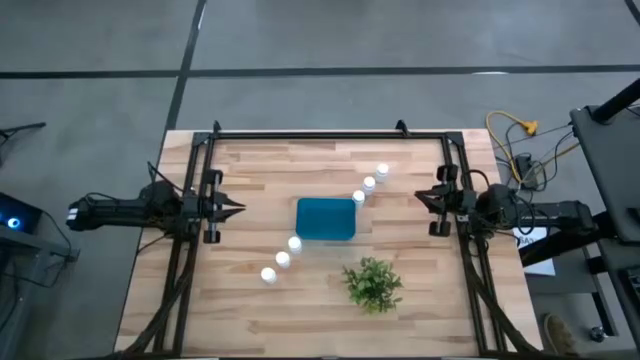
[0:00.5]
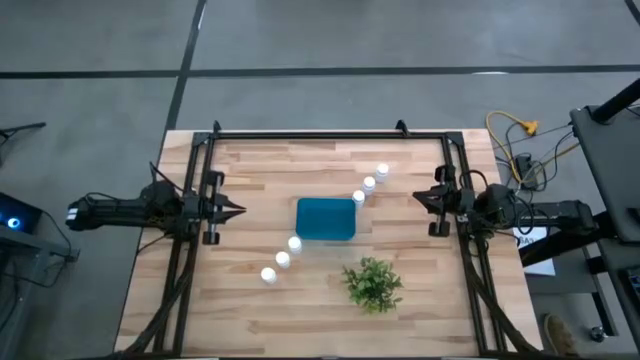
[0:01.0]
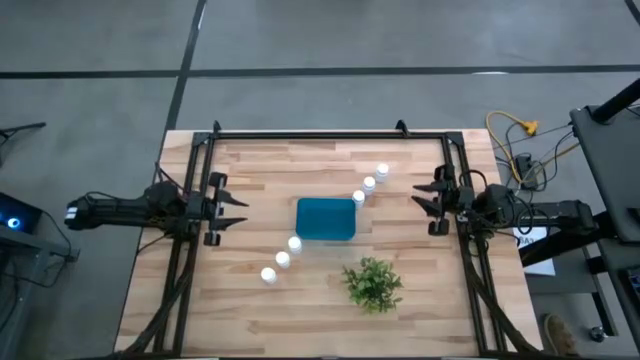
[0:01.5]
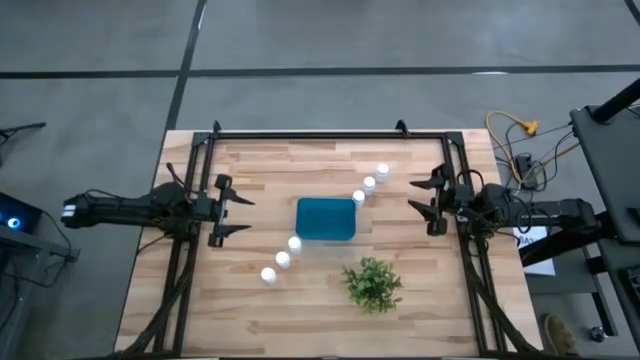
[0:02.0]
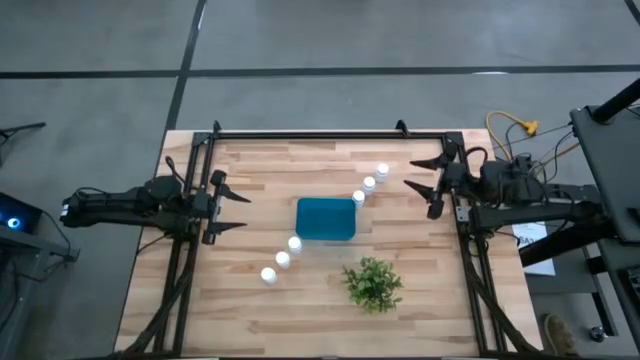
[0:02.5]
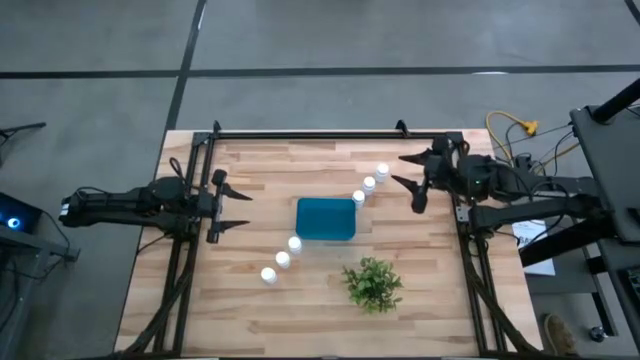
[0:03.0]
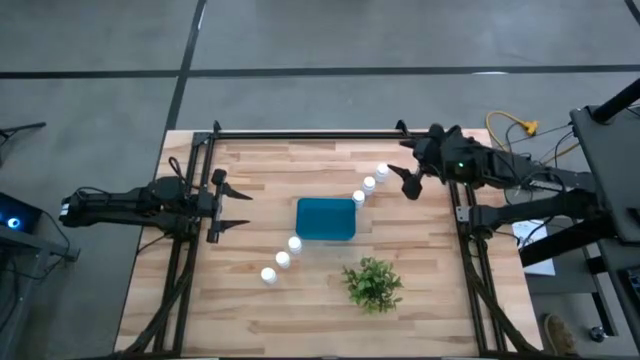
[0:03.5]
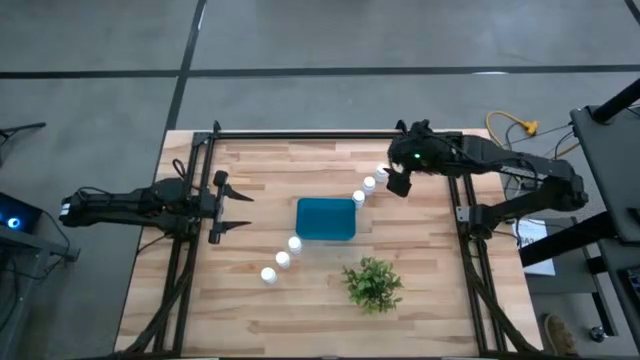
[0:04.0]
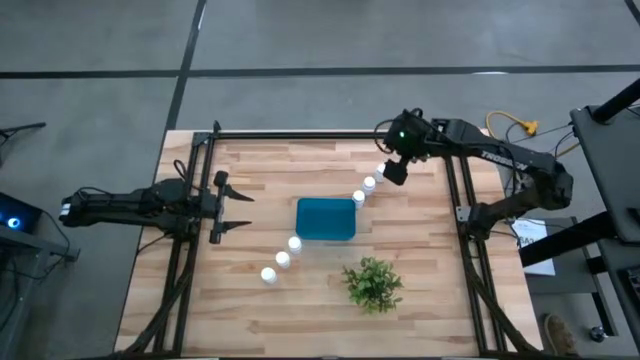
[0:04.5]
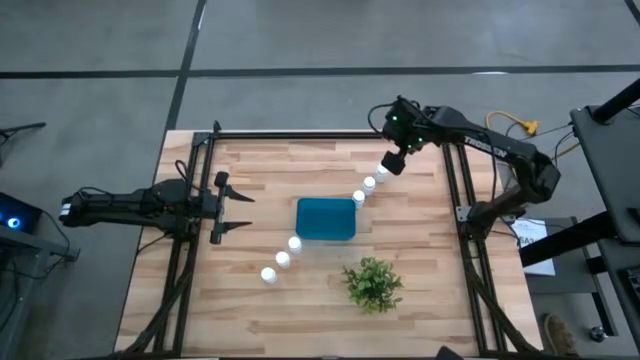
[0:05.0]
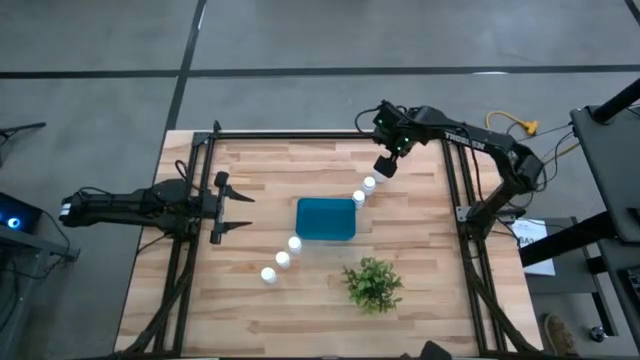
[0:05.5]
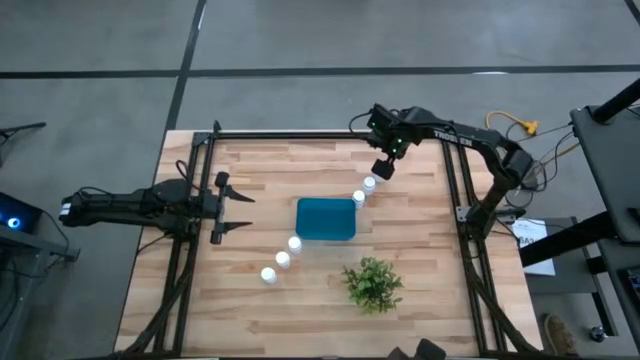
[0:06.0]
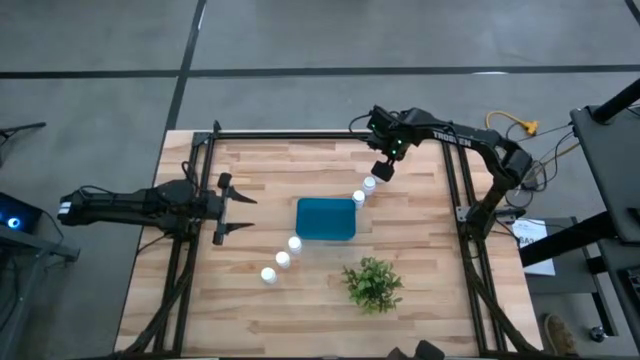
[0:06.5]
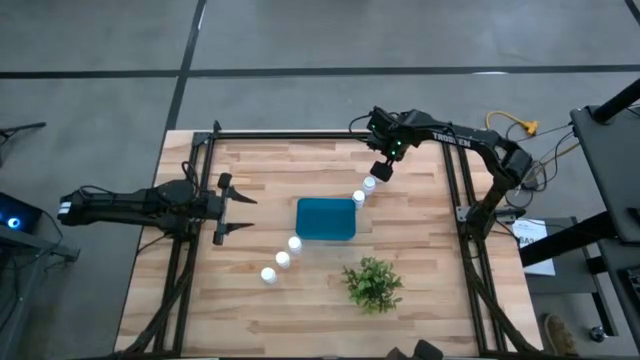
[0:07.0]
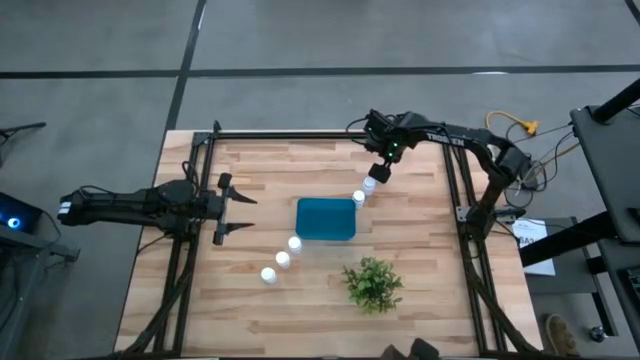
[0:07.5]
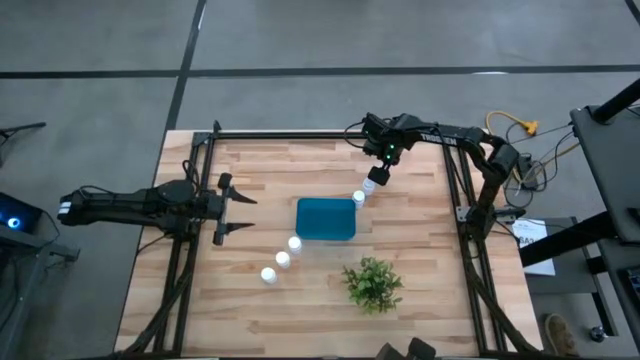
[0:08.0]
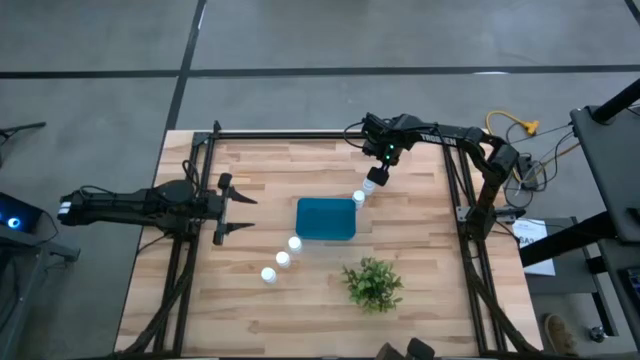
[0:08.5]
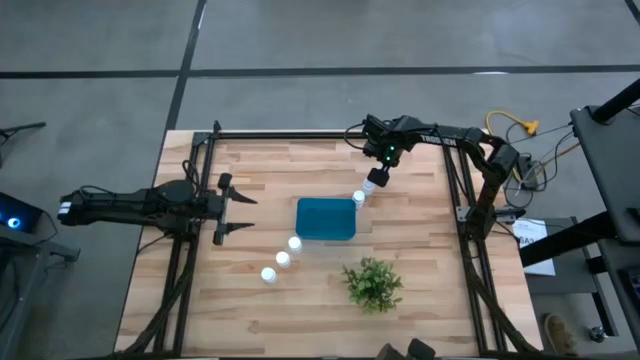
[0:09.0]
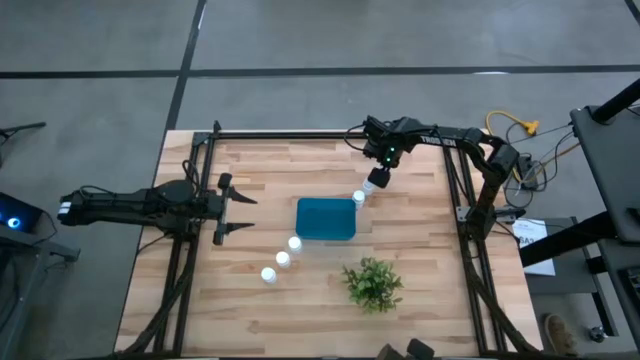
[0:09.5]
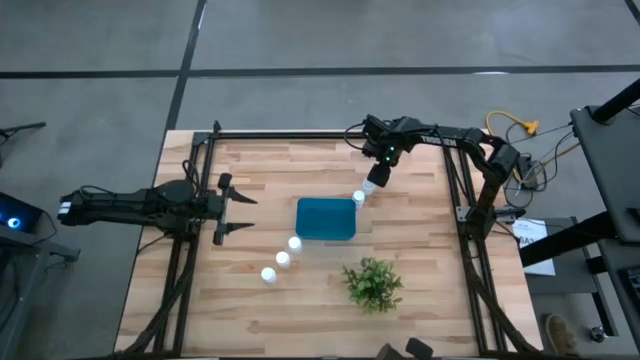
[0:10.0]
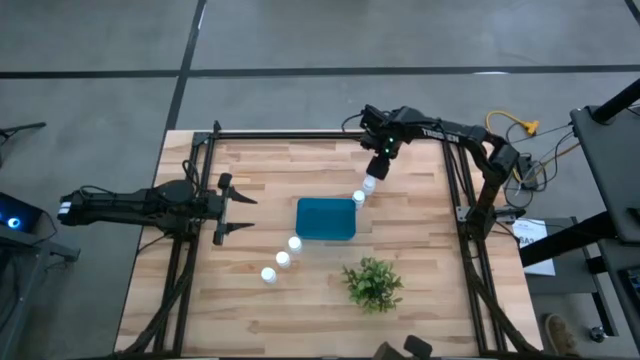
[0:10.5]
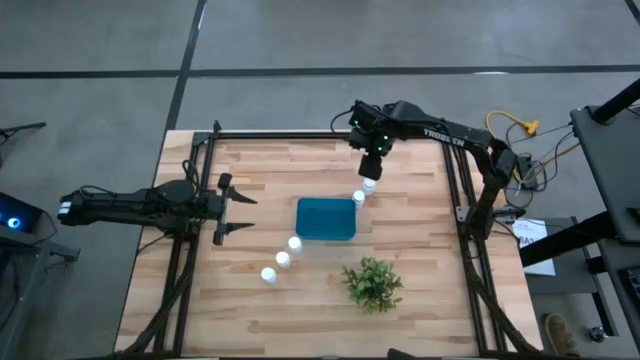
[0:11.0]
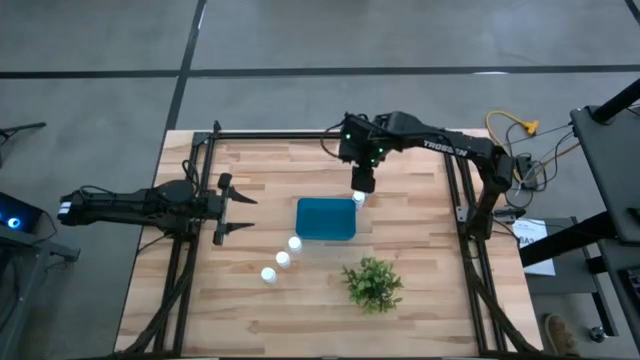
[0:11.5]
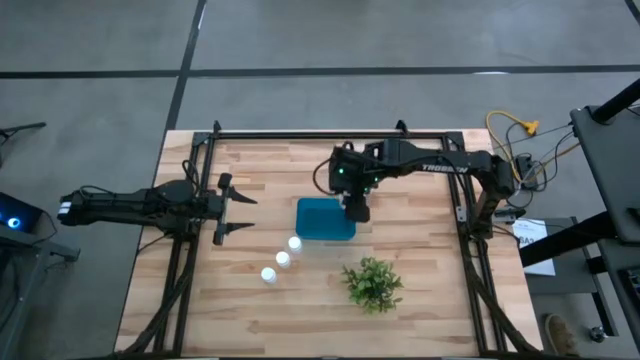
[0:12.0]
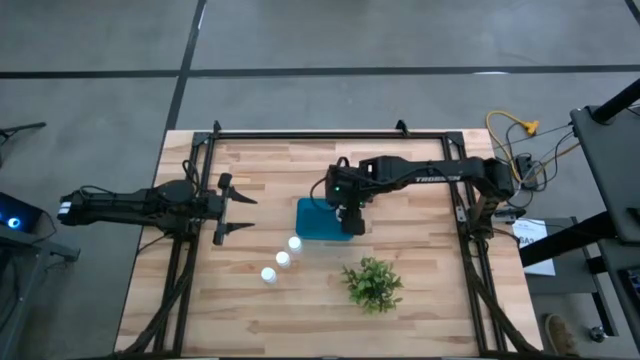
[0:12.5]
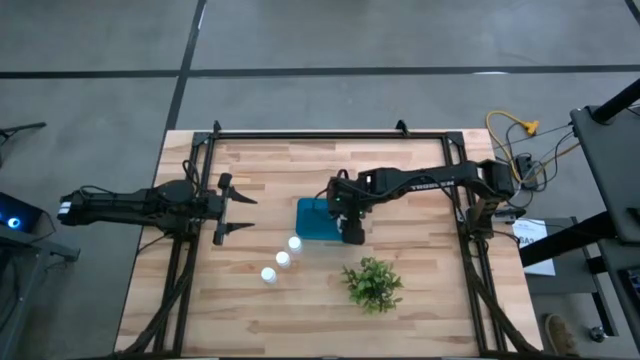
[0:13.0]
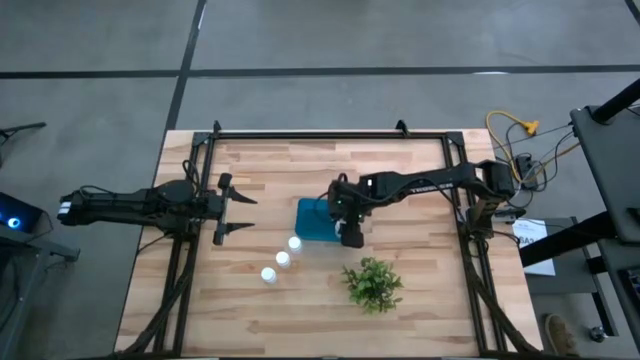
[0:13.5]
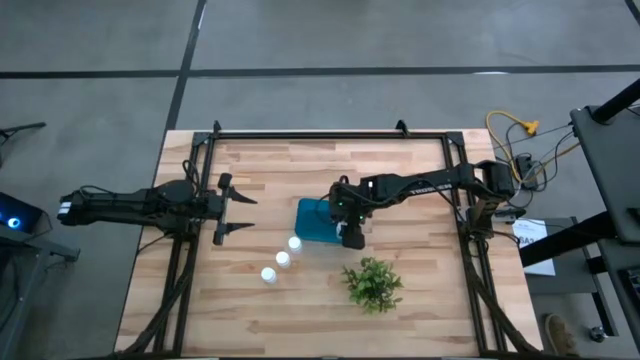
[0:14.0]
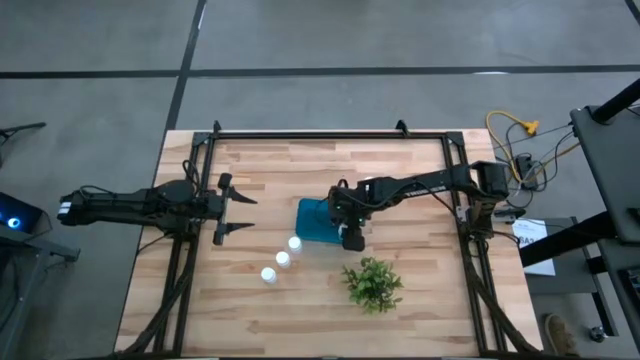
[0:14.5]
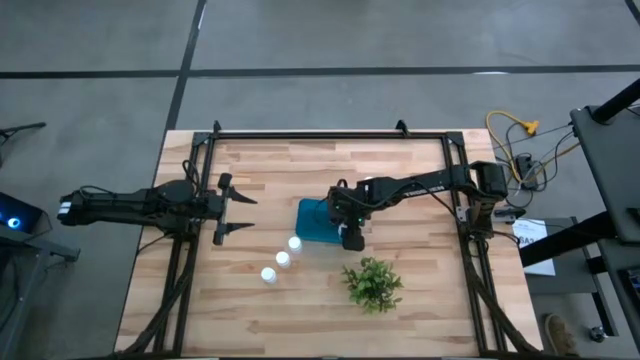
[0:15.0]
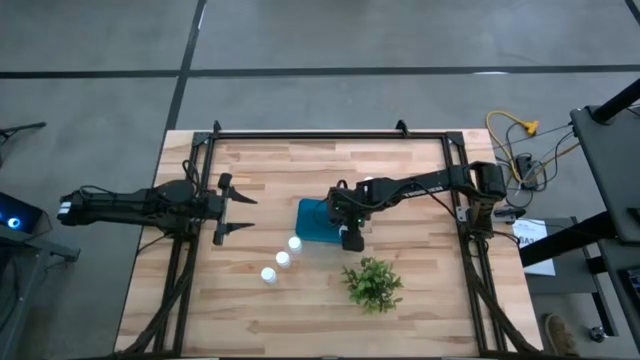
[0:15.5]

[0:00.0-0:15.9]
Task: Pick and place pill bottles into a basket
Put the white pill bottle in the blue bin
